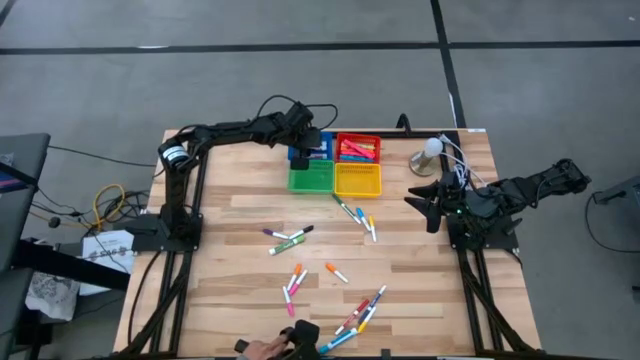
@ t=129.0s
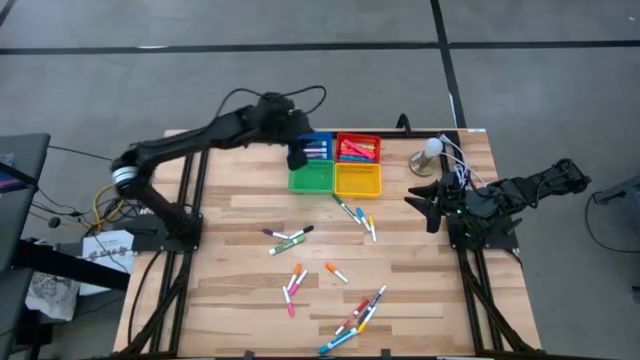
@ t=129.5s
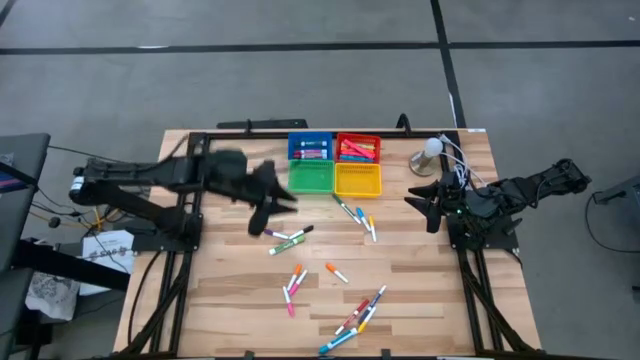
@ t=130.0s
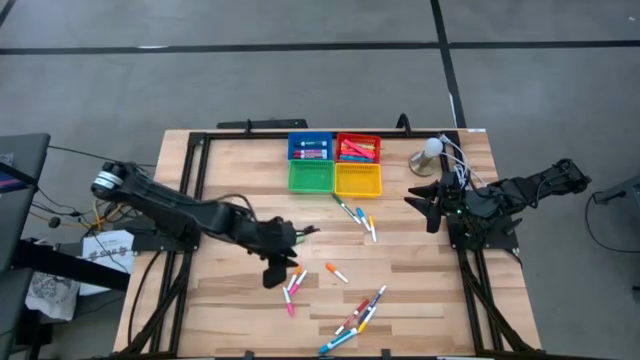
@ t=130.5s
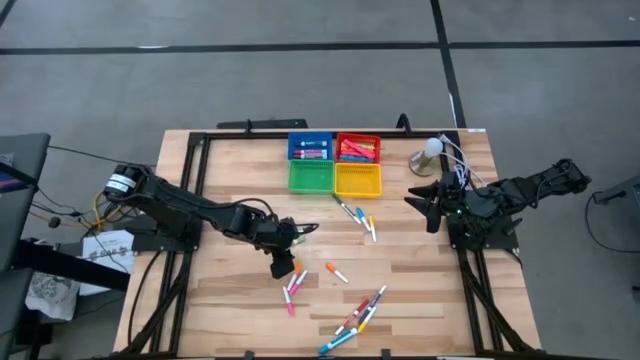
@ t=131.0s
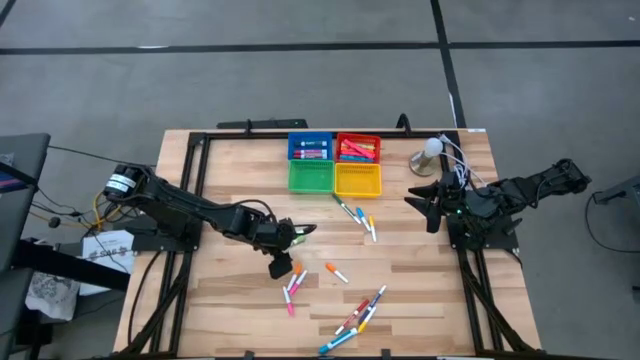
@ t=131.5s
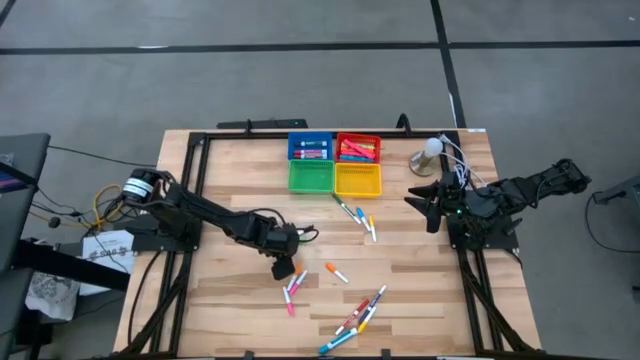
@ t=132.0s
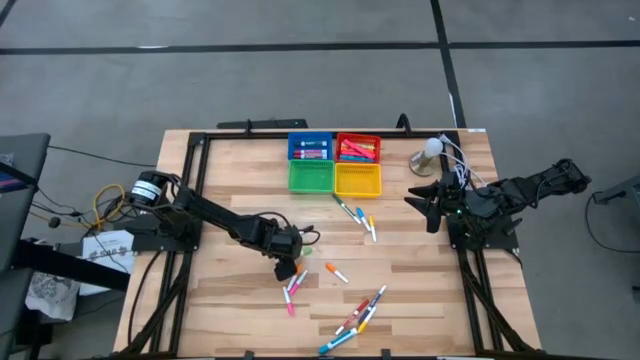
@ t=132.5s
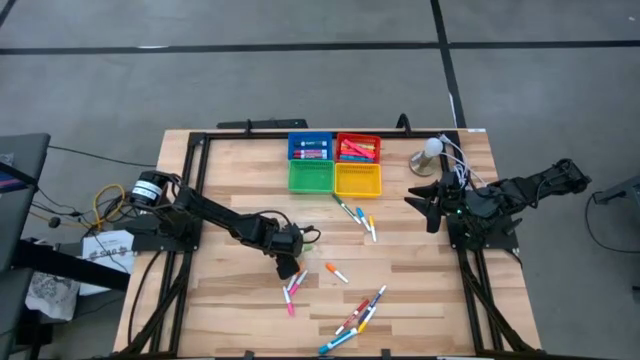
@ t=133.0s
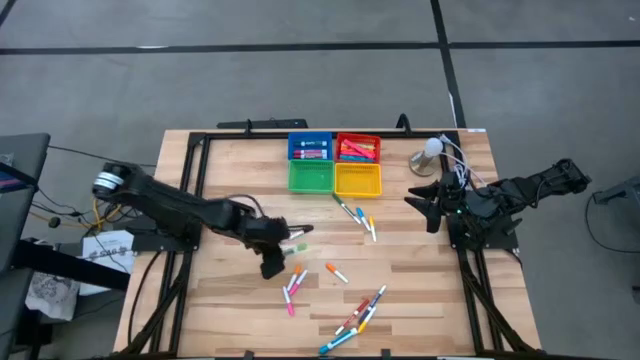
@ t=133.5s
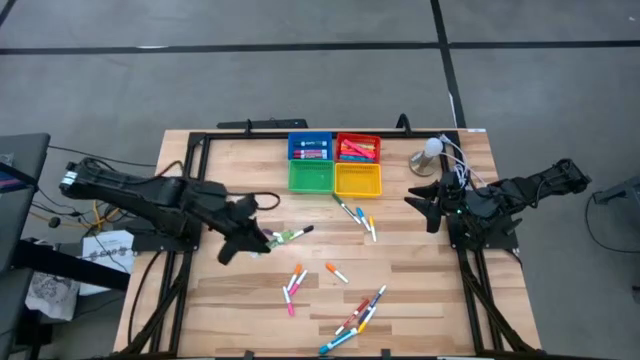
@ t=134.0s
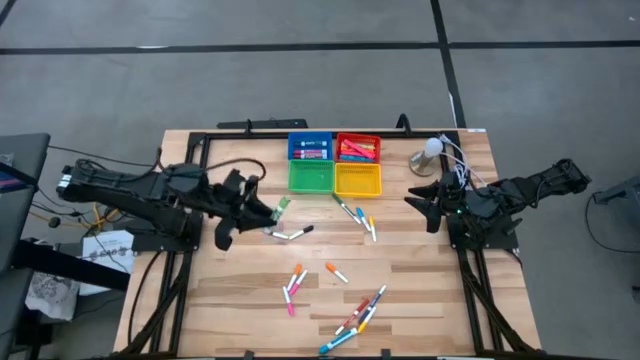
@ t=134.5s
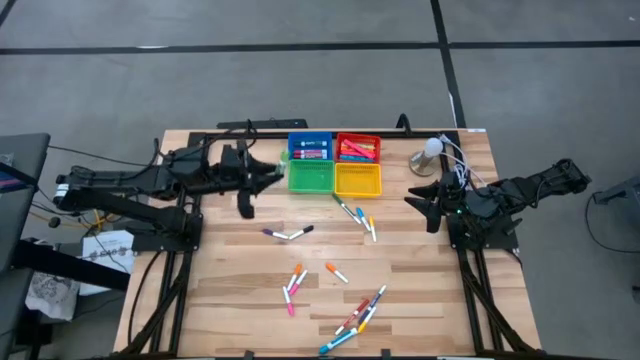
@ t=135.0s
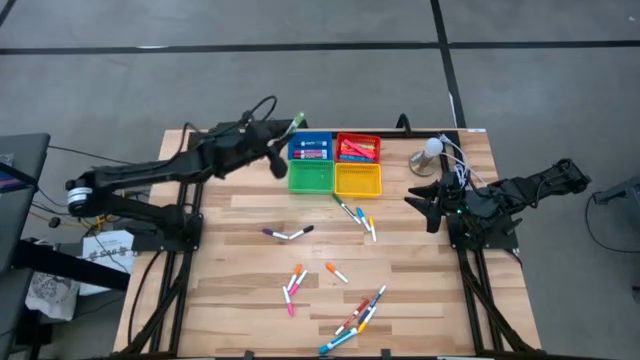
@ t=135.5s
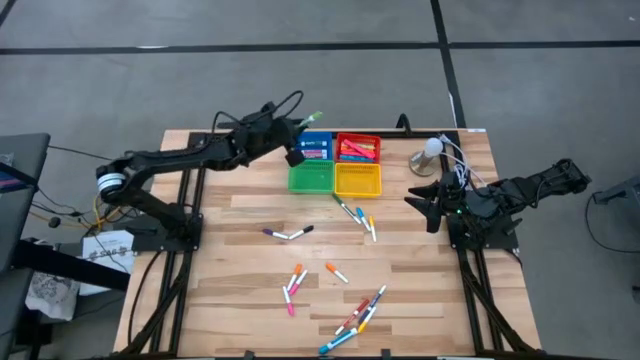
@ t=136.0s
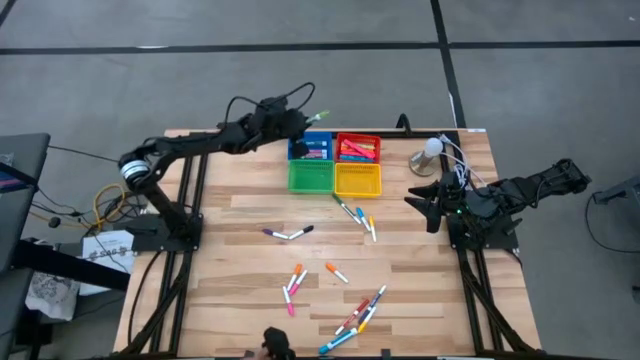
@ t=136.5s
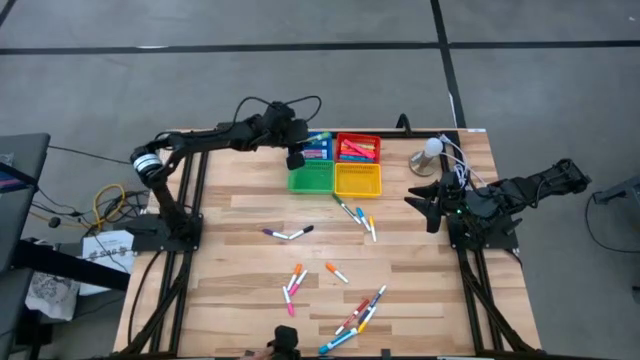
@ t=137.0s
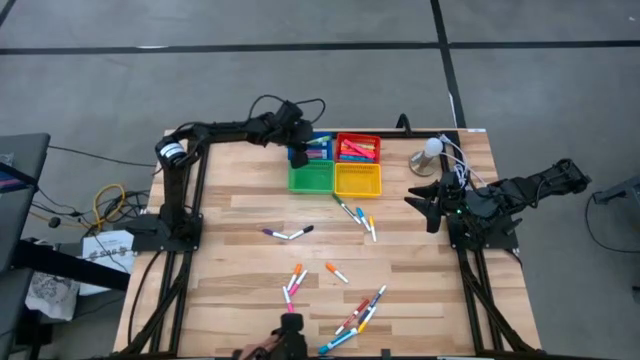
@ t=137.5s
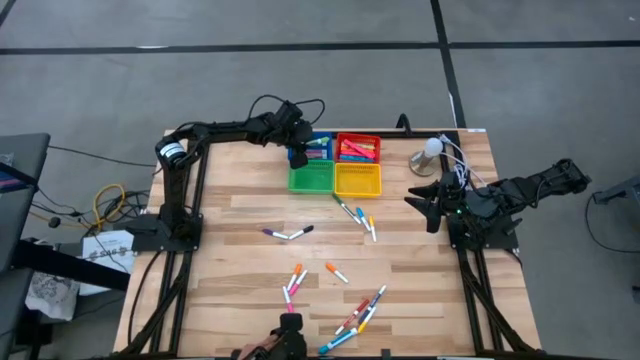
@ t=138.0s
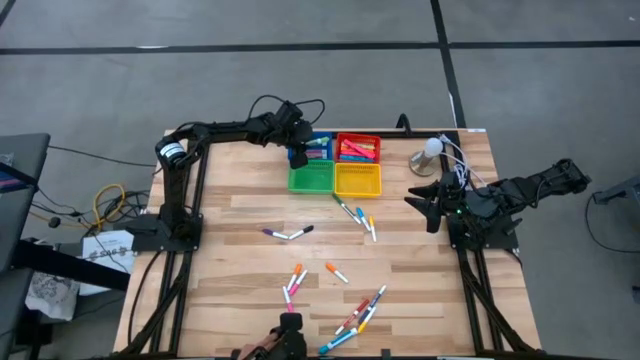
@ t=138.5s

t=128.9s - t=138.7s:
Task: Pick & Place Markers
Put the light green highlighter in the blue bin

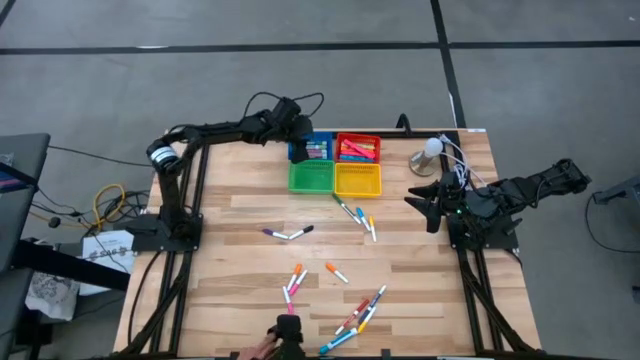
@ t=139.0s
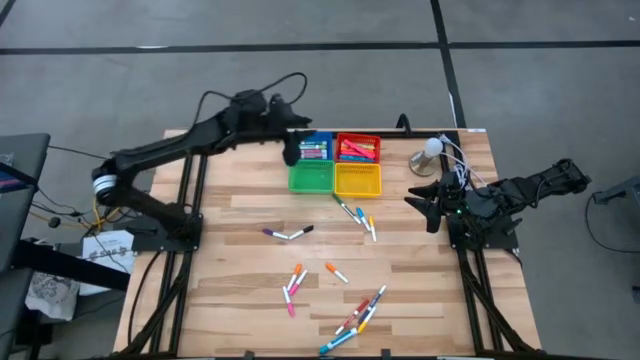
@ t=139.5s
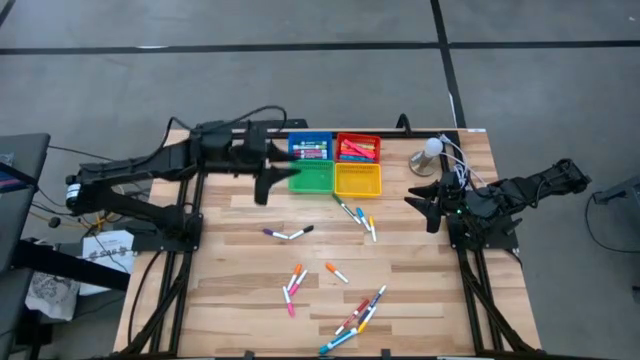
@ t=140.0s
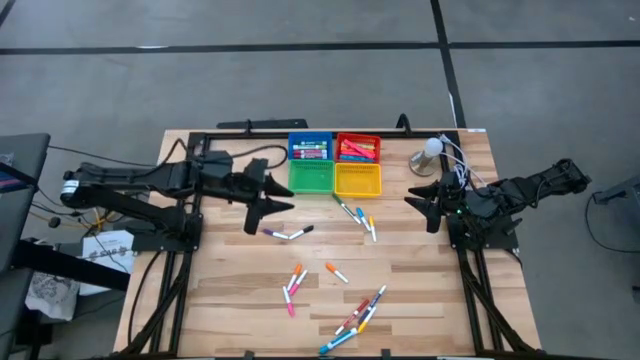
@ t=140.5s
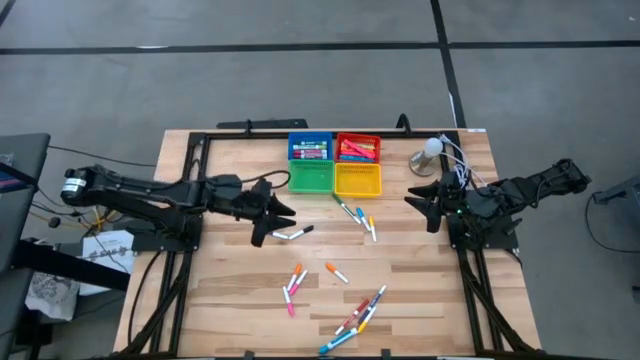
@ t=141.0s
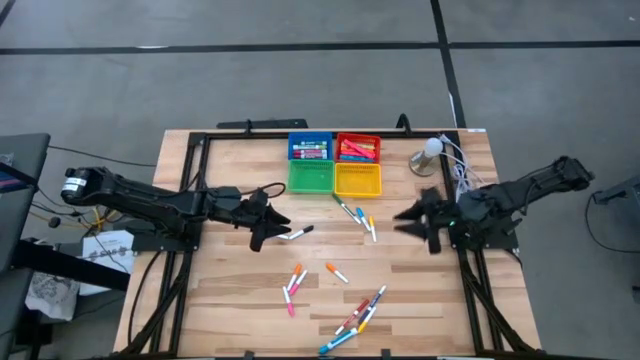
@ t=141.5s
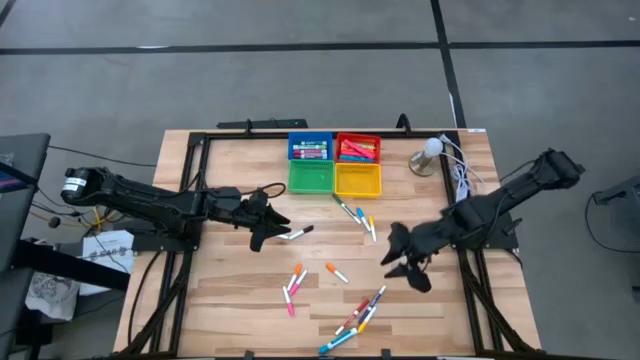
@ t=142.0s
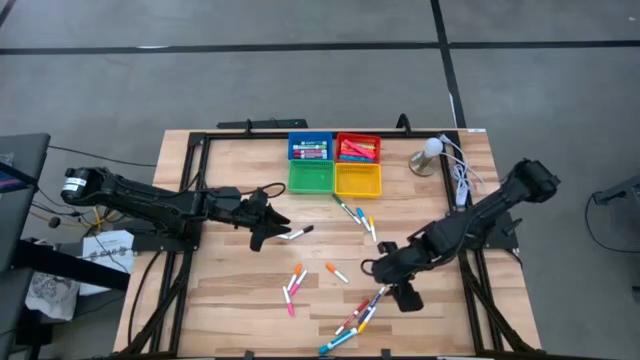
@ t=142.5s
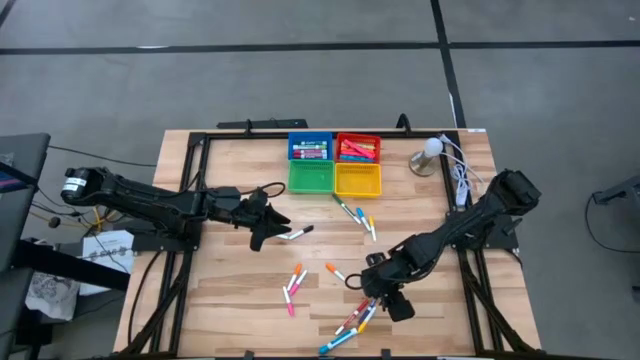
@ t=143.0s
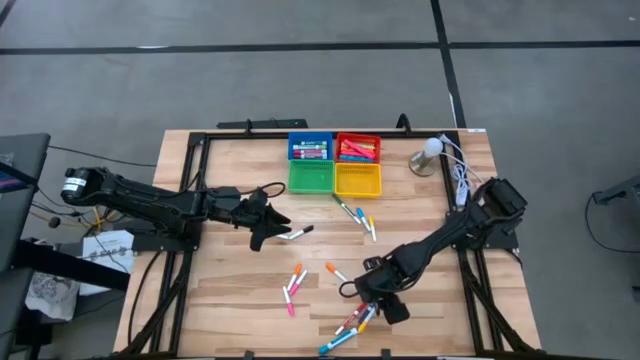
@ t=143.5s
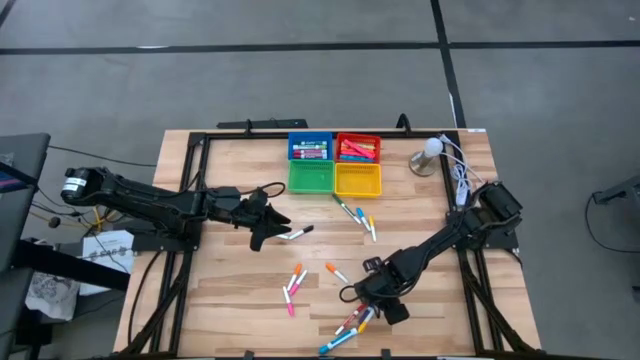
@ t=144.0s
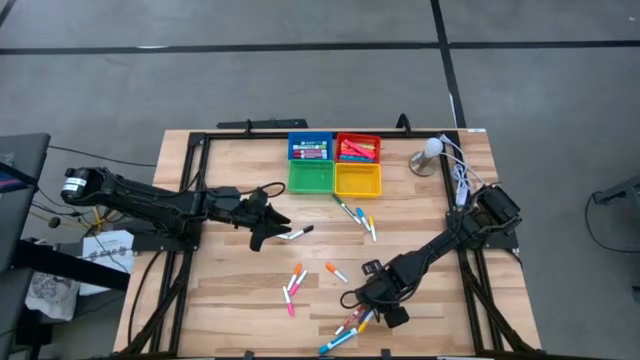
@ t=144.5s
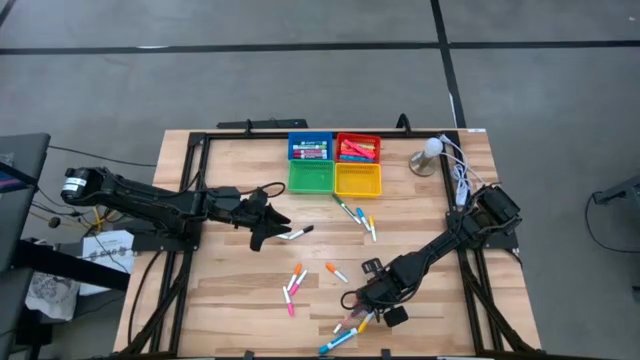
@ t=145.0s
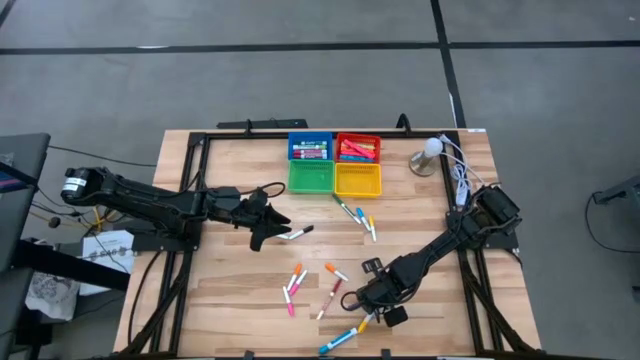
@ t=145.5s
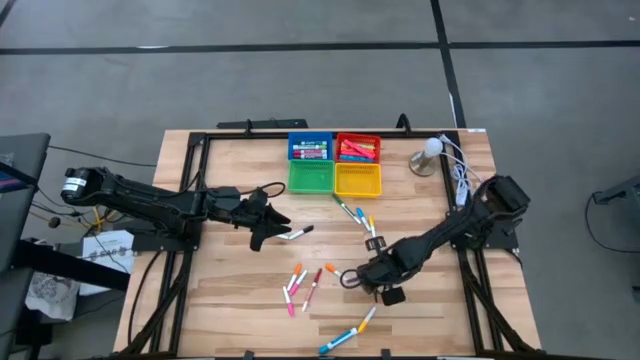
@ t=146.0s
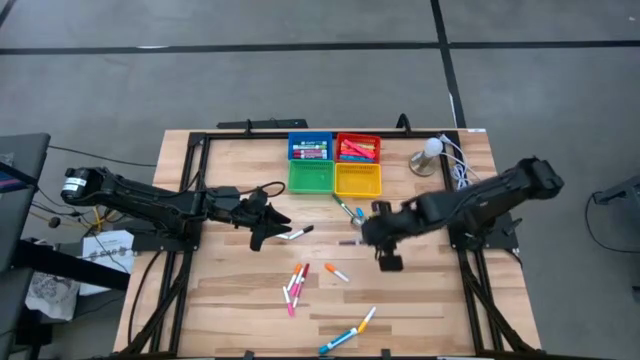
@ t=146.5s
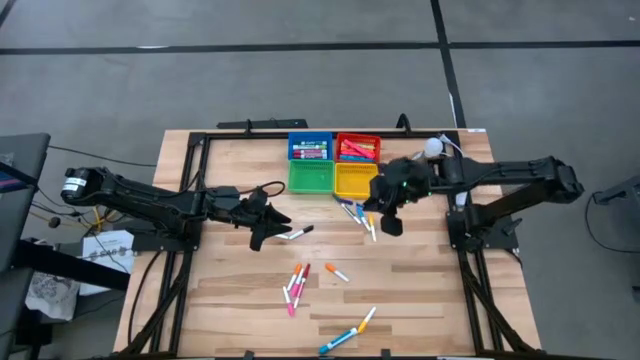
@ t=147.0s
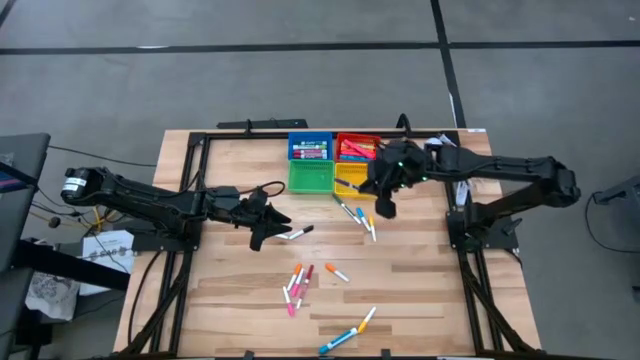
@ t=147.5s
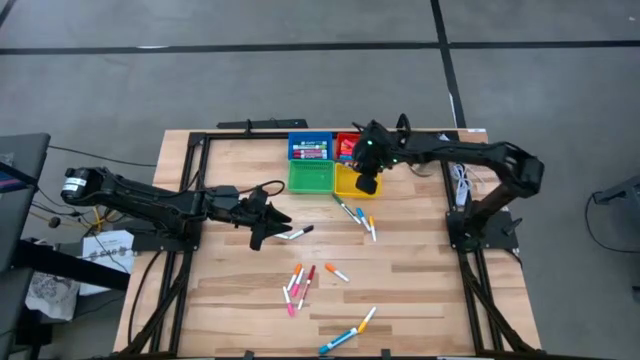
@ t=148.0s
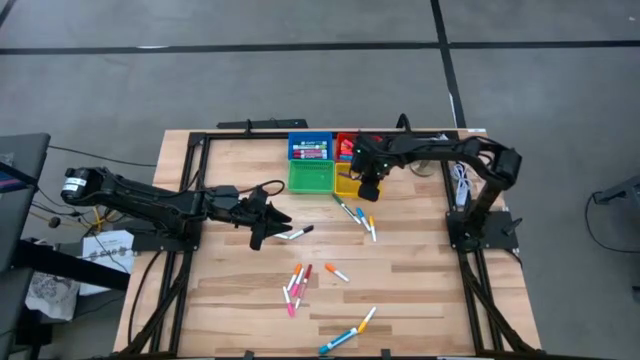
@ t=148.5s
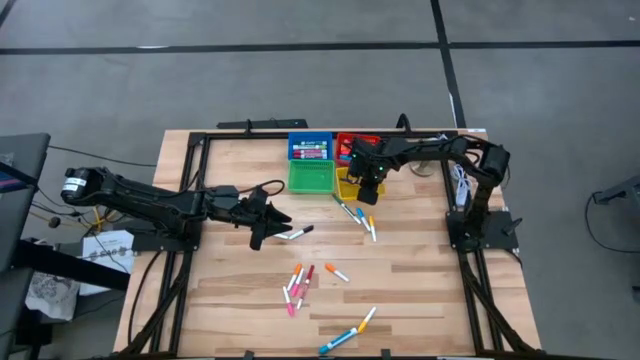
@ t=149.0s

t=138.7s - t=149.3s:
Put the dark blue highlighter in the yellow bin
